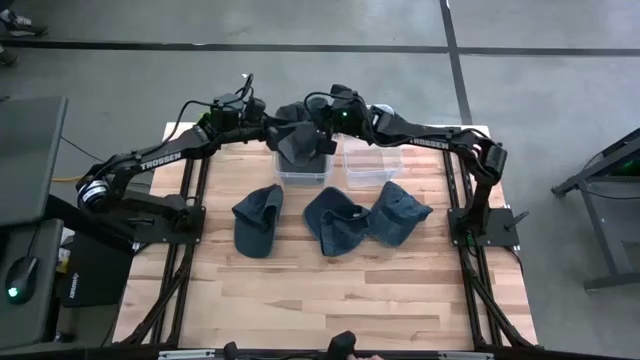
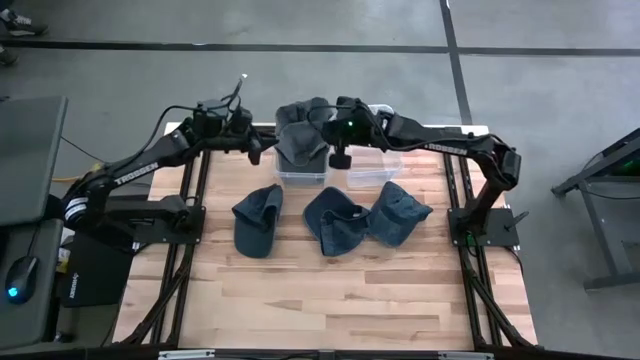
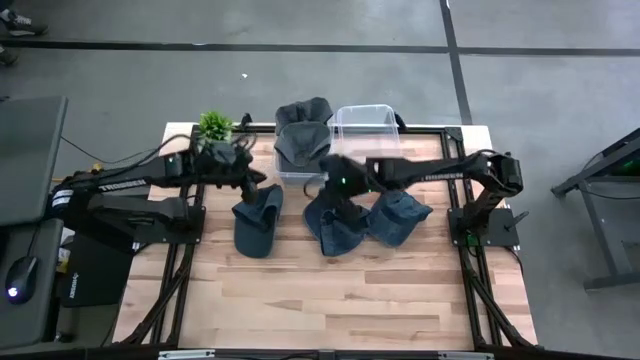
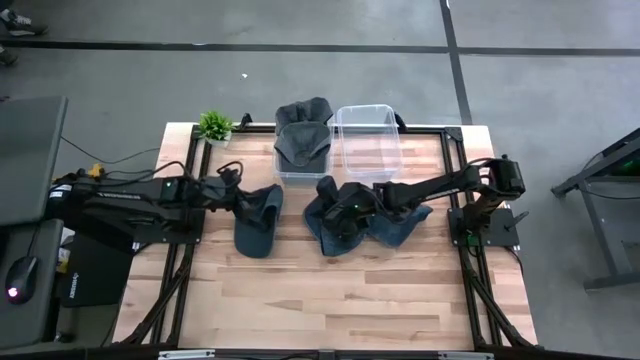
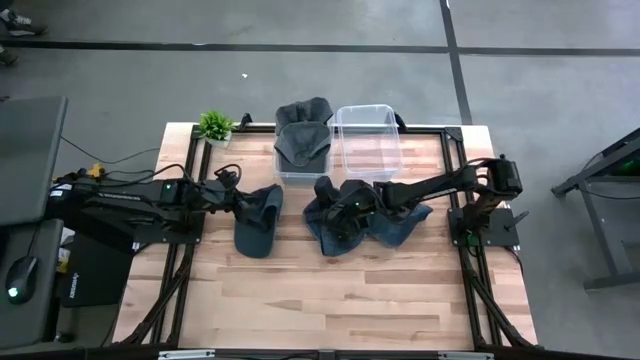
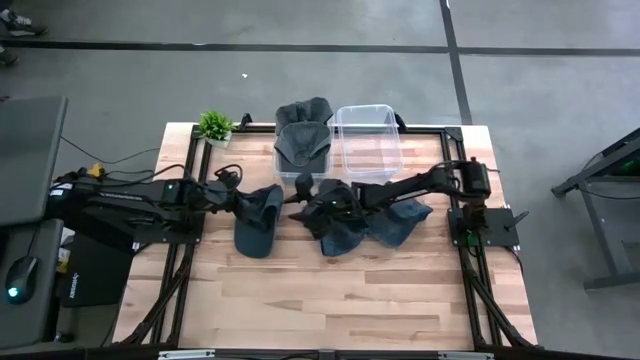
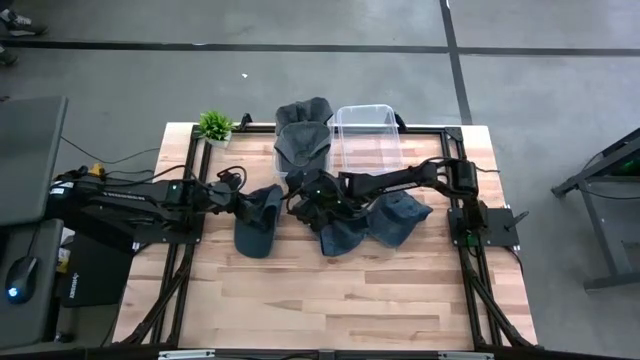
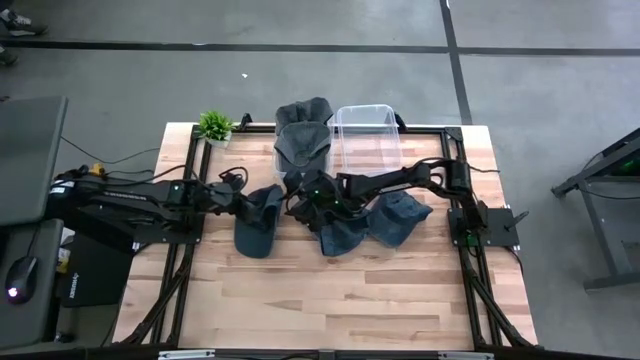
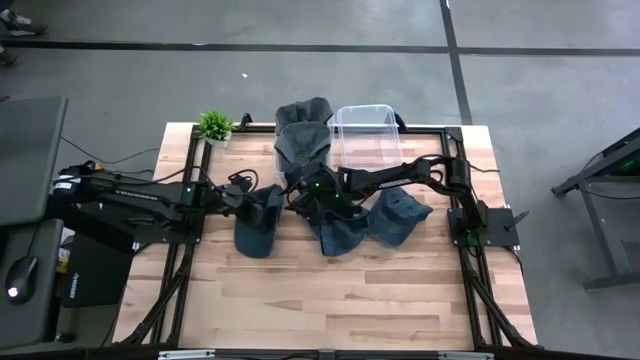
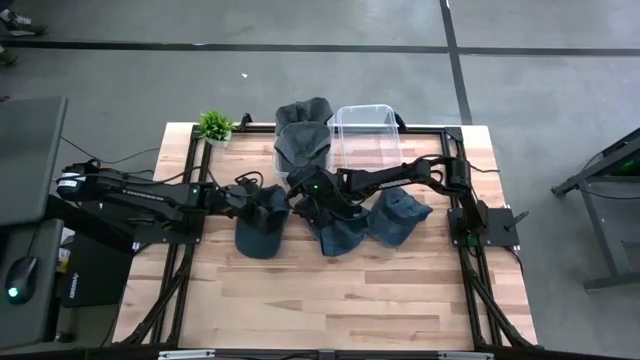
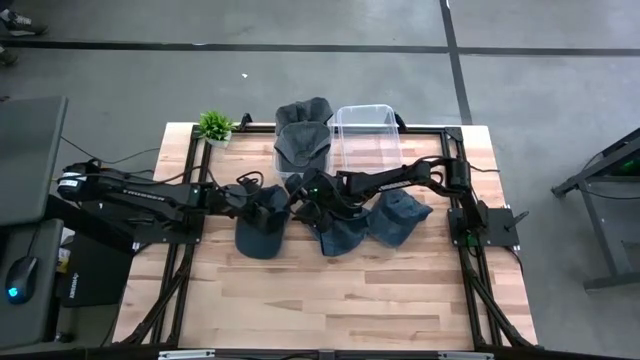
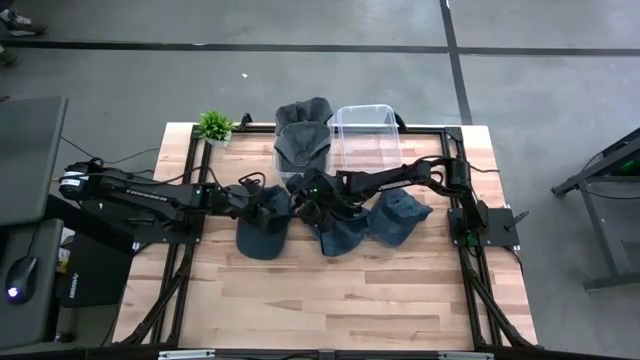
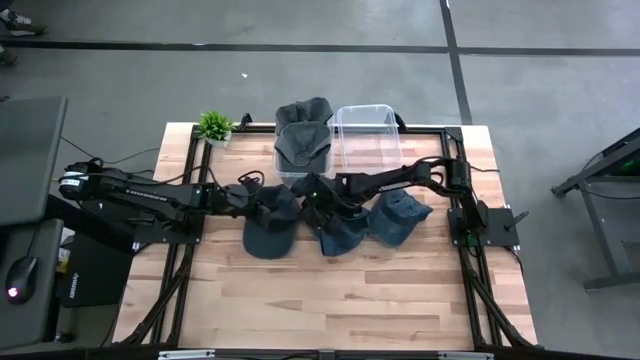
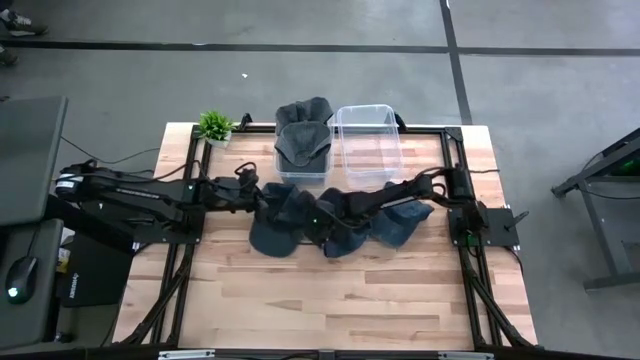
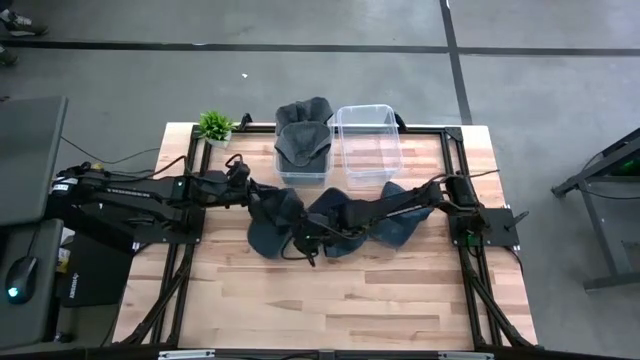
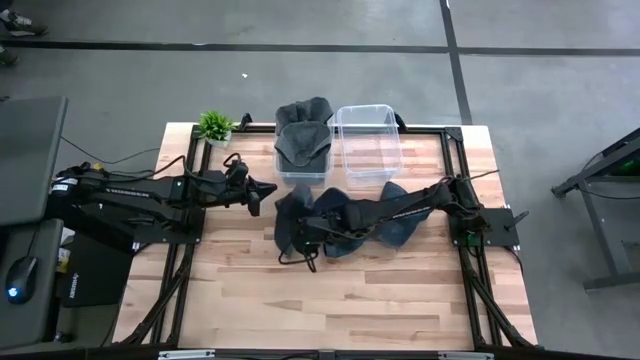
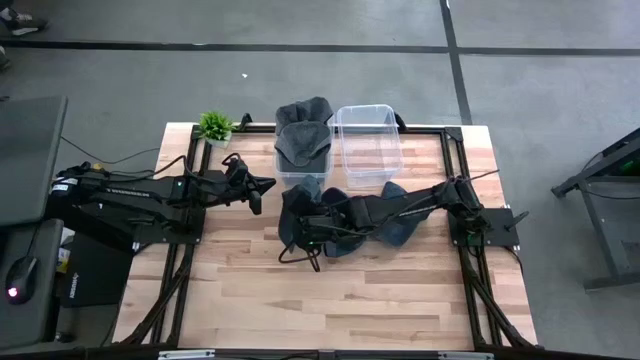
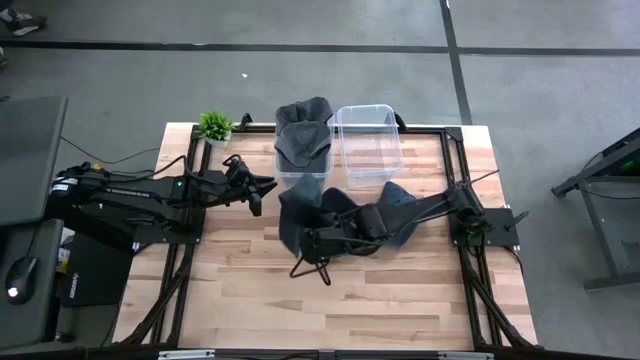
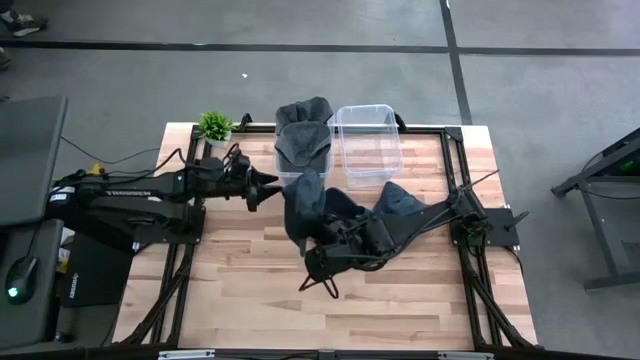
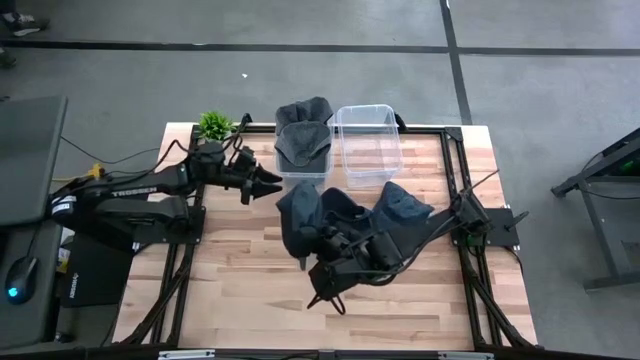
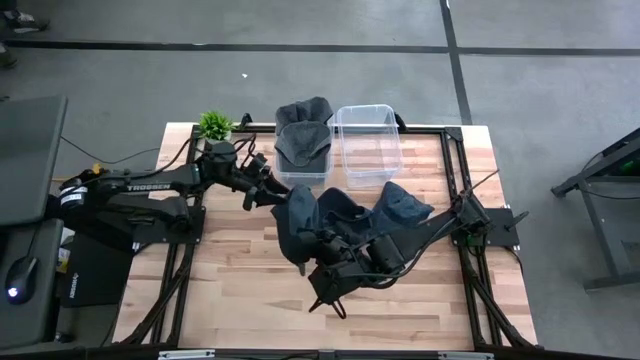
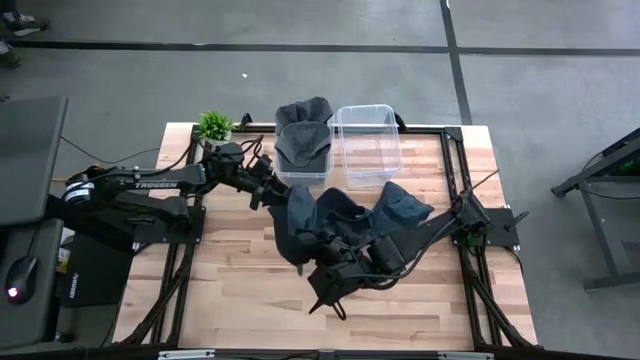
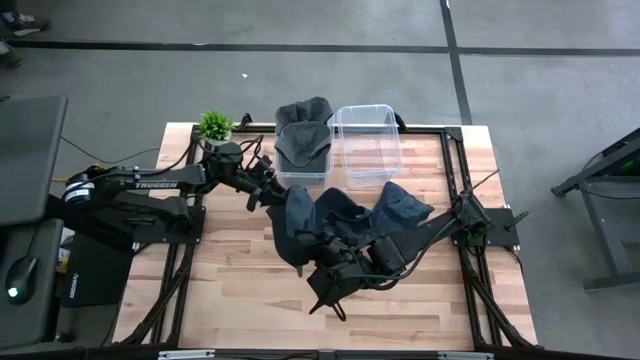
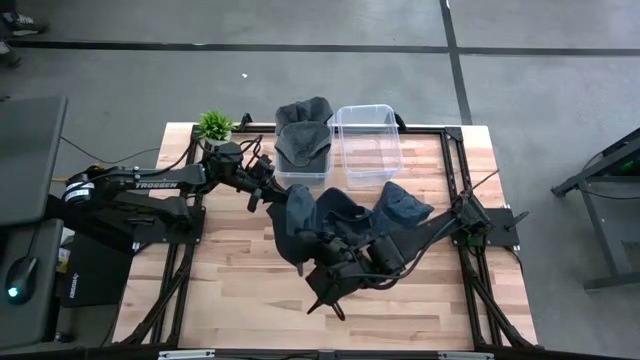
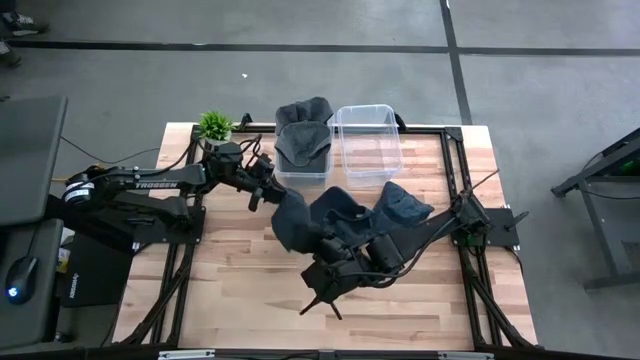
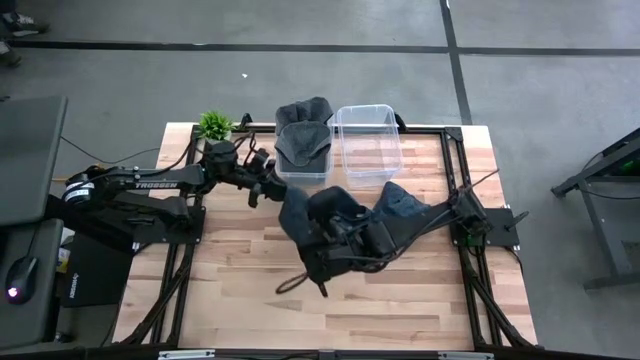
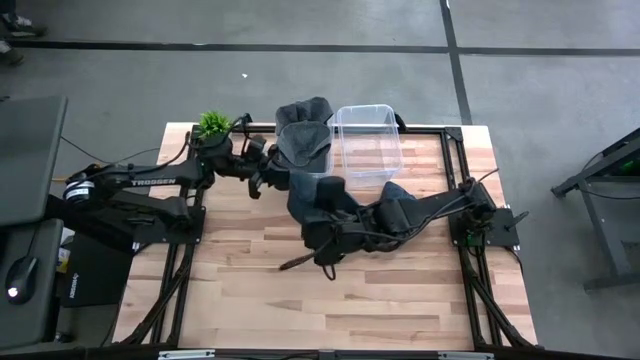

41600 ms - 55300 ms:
Task: Pick & Place hat
Put the left blue cap into the right transparent bin
